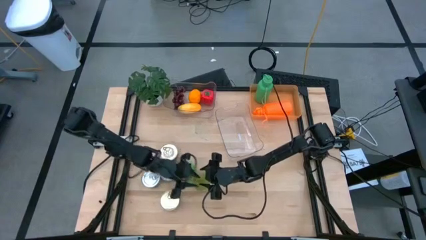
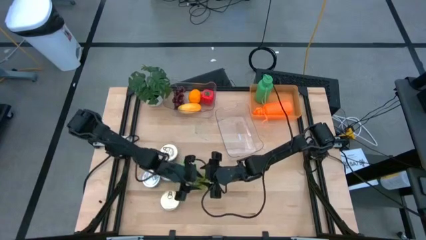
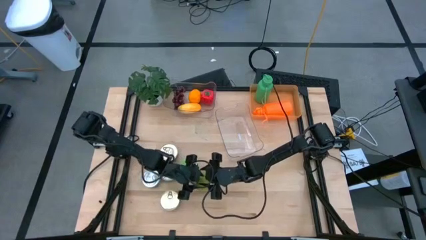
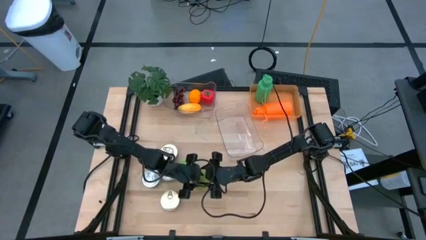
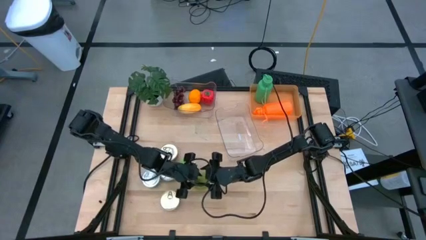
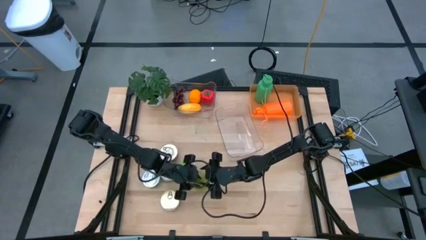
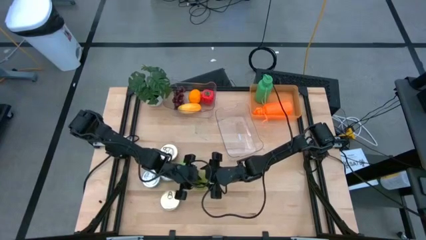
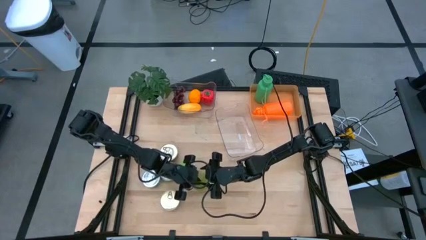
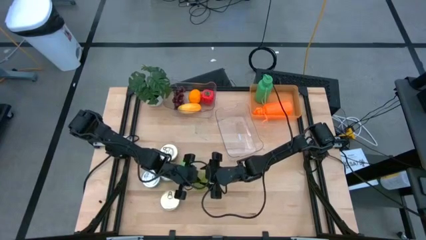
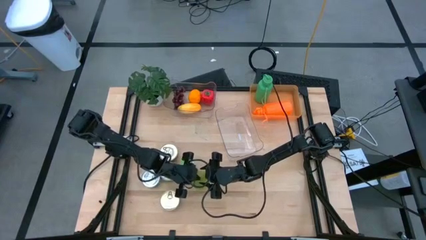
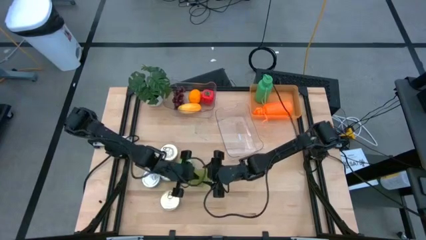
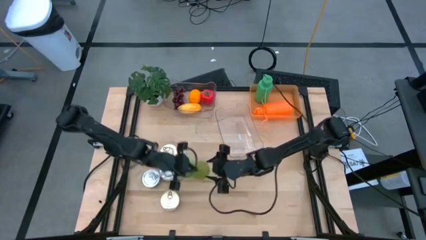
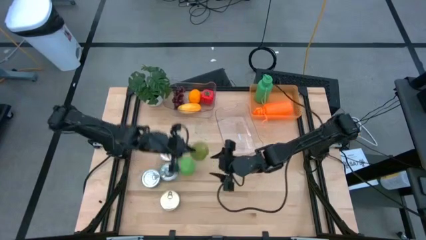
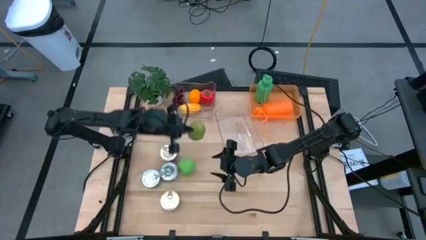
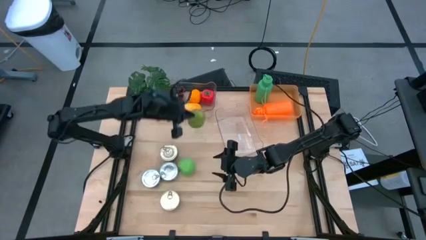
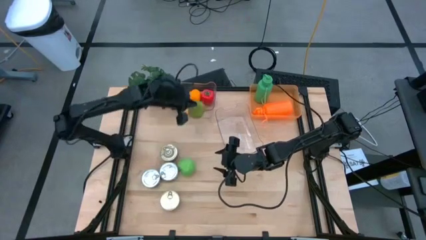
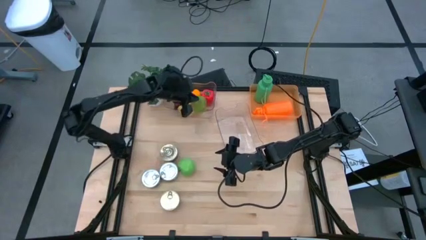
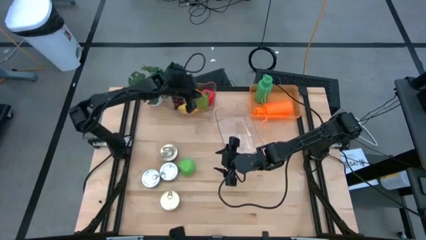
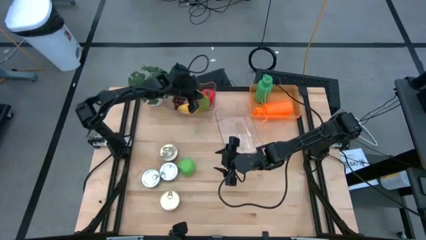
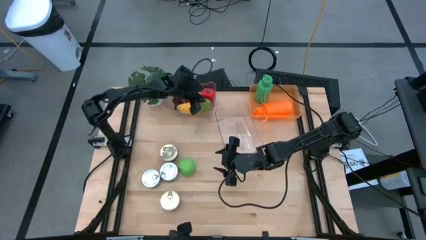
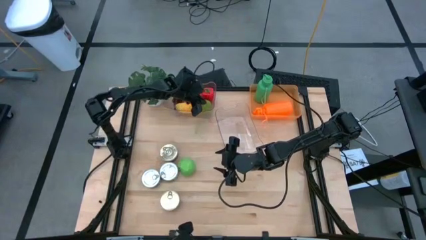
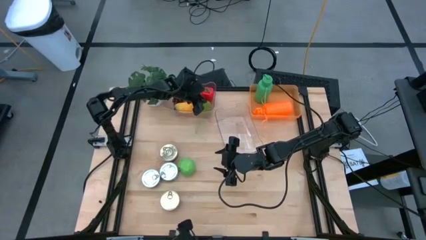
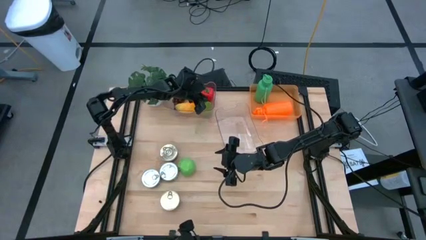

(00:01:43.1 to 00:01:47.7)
Task: Pick & Place Food Item
Put the green pear into the top transparent bin

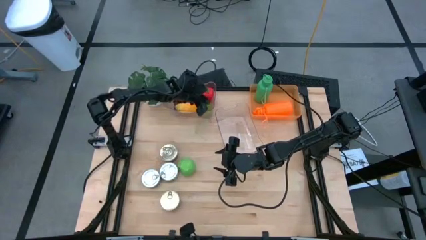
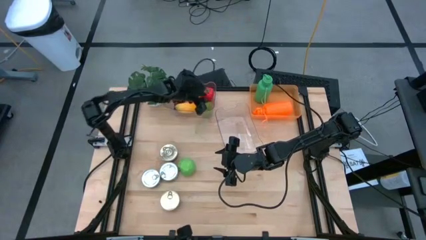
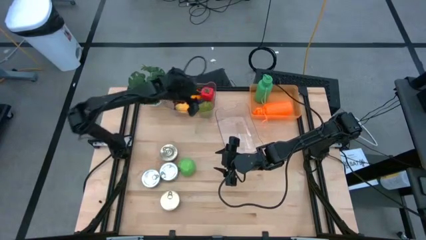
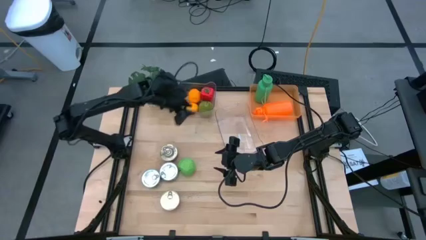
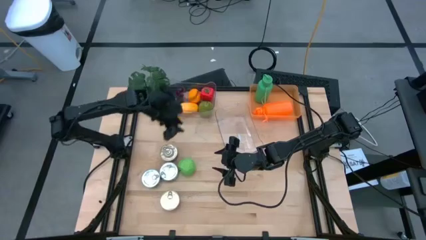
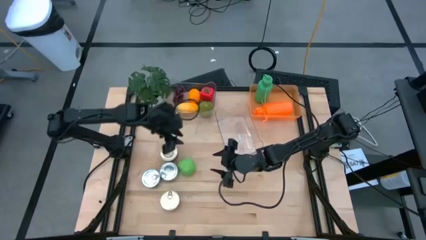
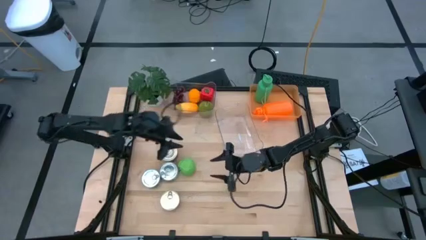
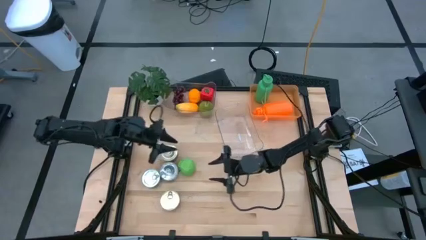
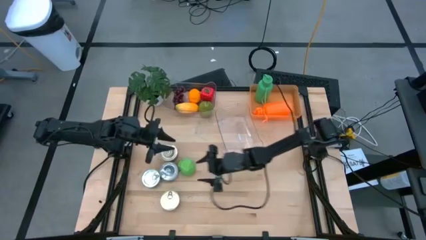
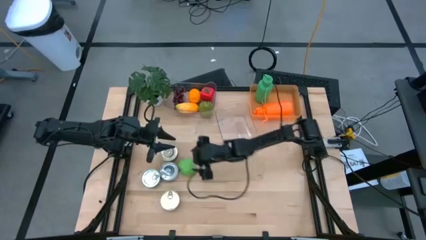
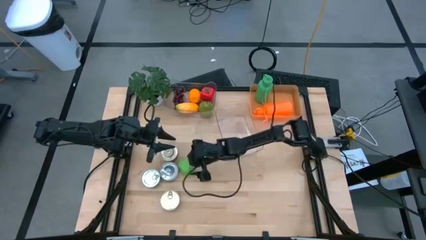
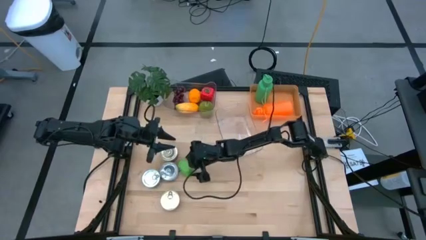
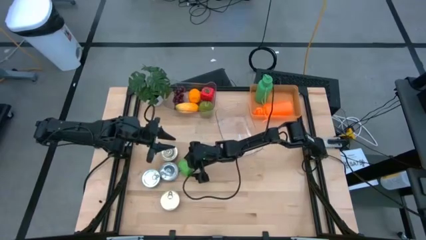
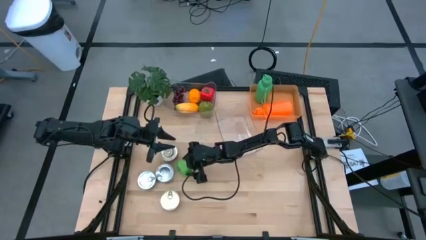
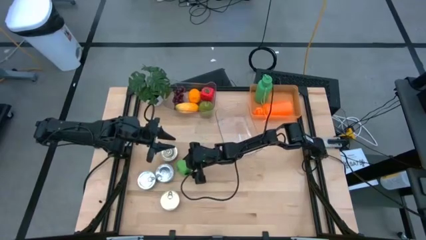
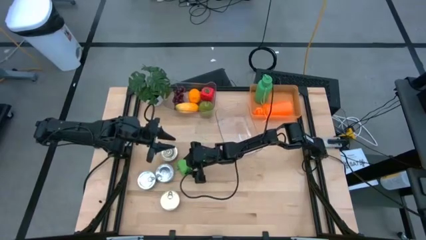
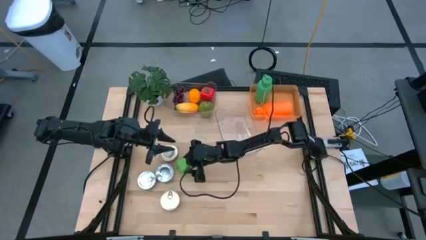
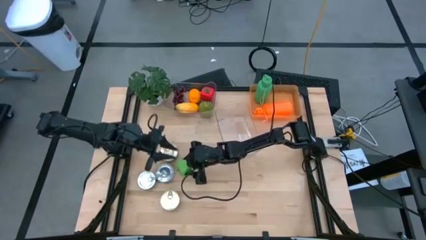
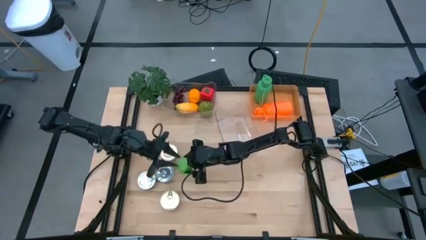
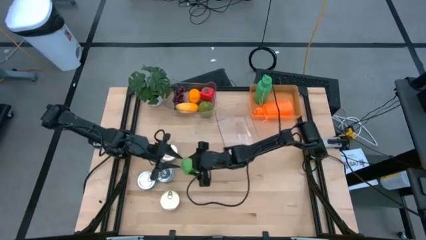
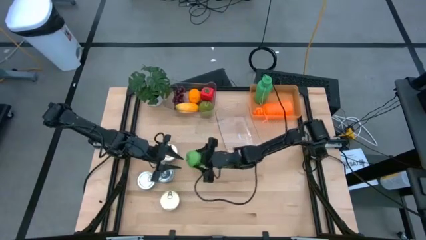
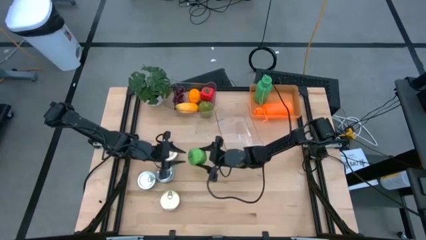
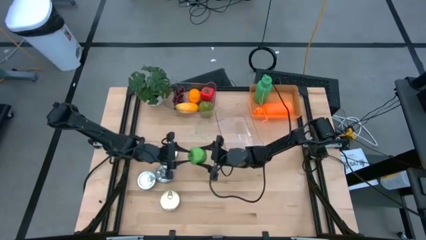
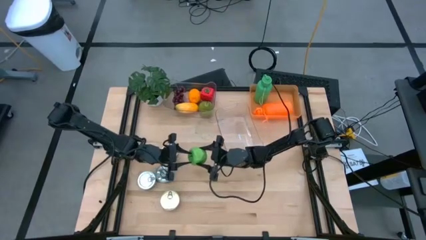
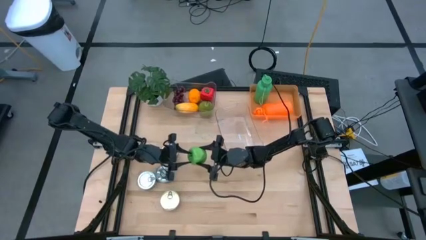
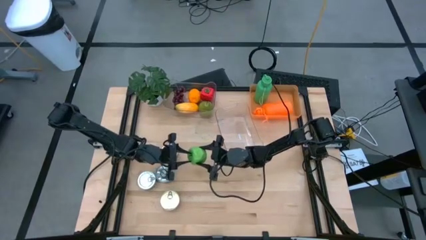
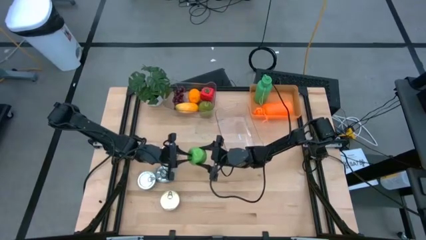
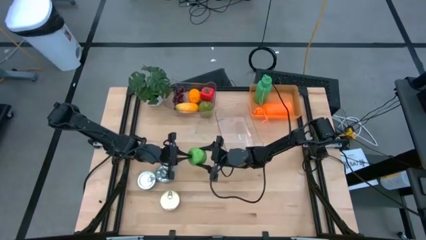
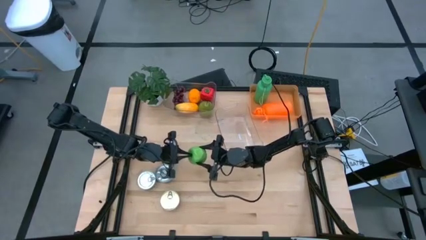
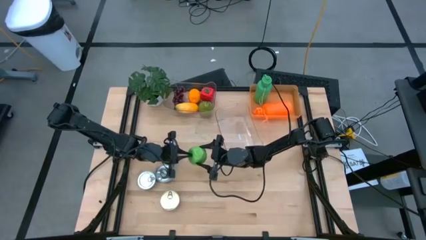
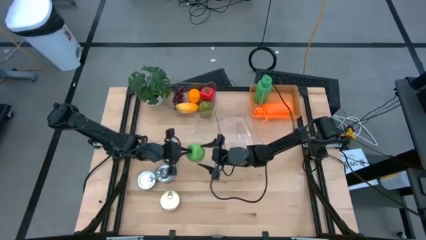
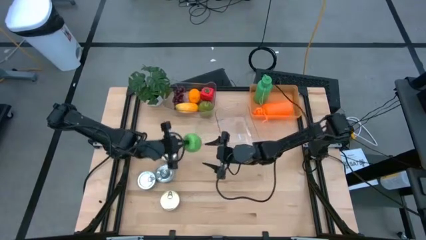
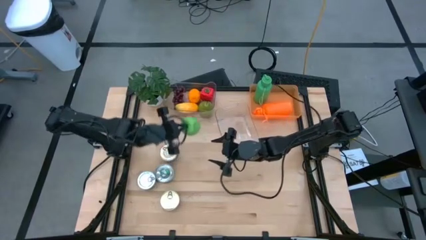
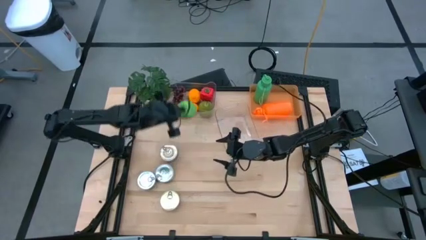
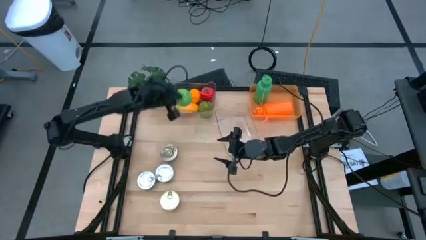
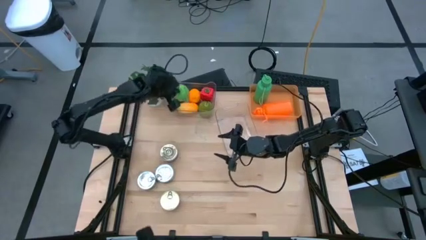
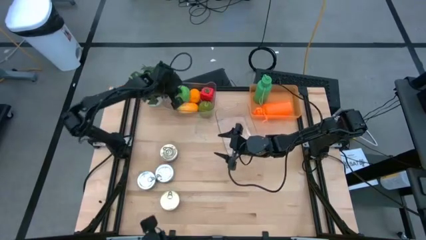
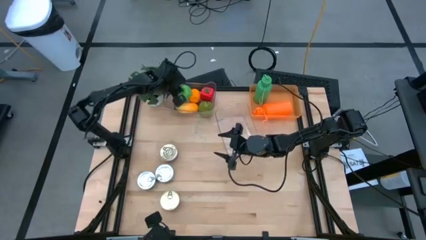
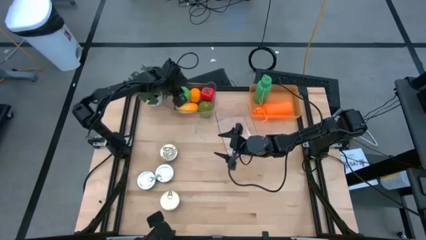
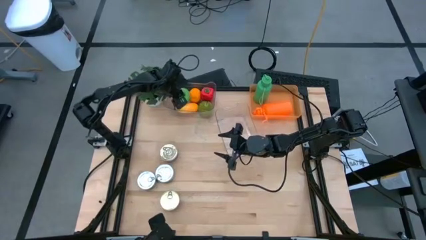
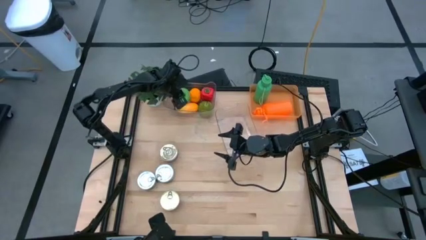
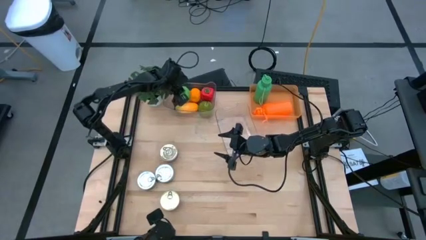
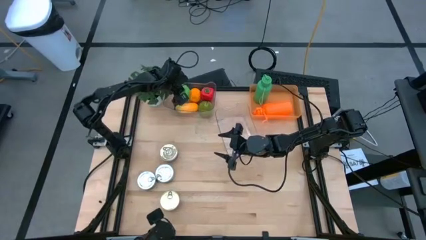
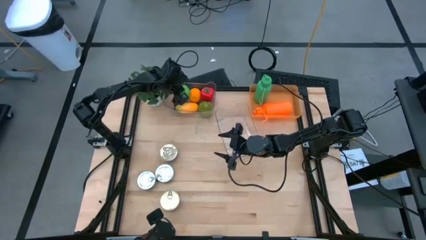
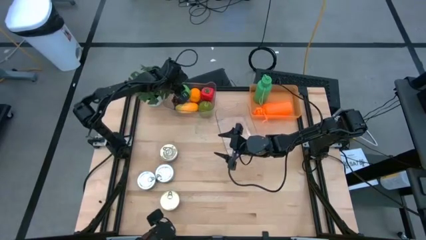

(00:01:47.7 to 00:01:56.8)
Put the green apple into the top transparent bin

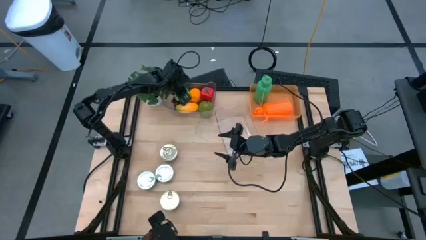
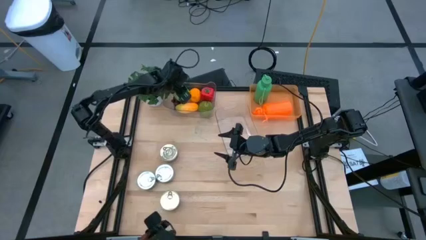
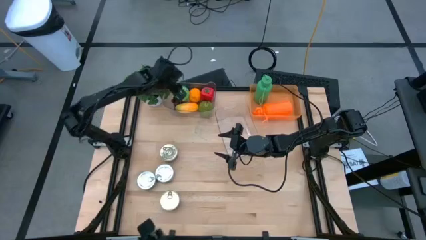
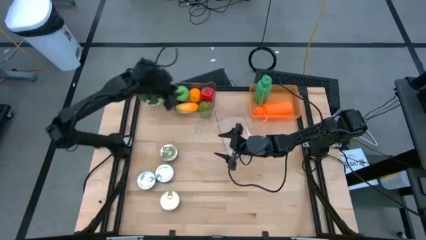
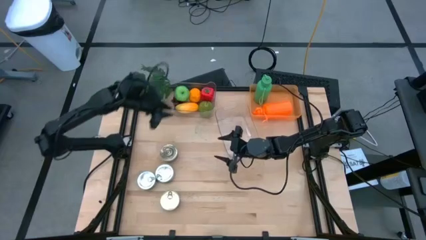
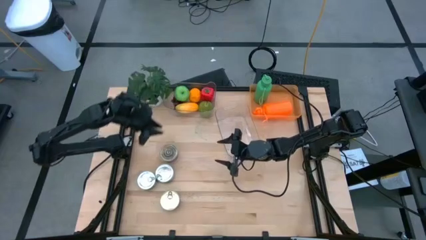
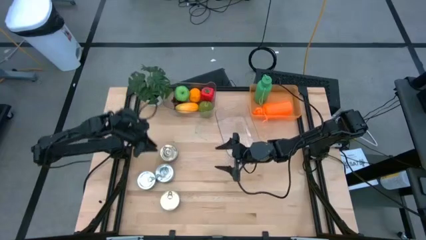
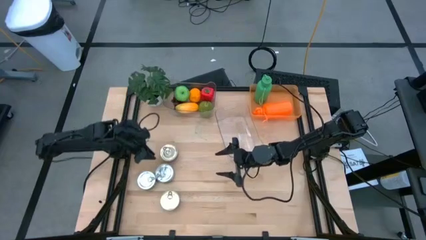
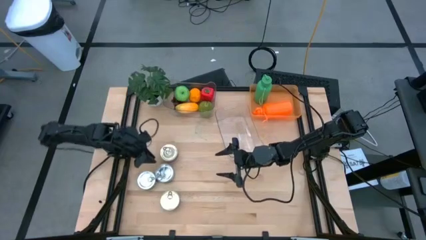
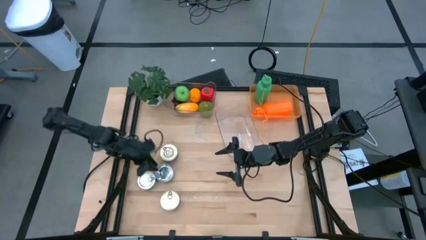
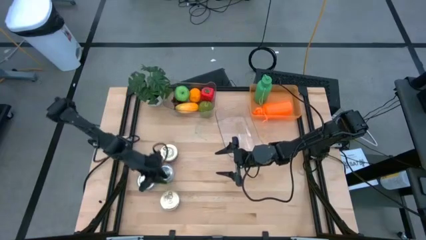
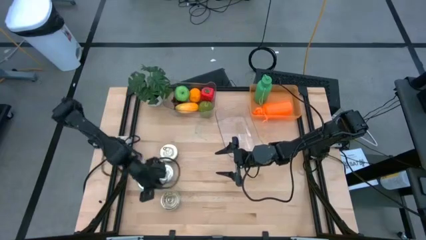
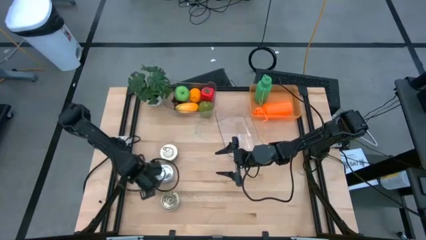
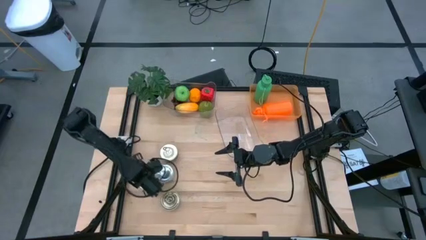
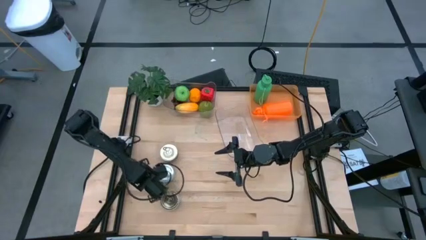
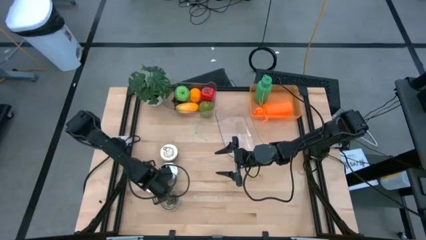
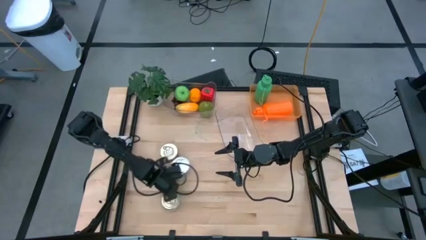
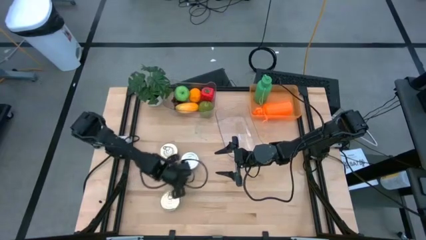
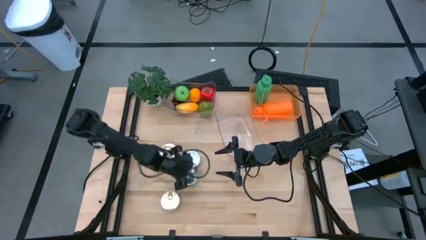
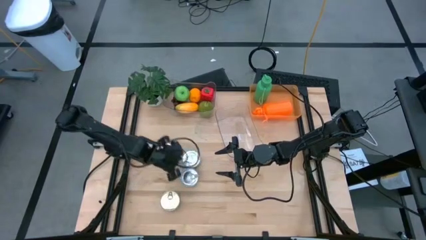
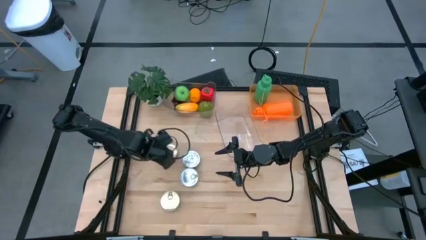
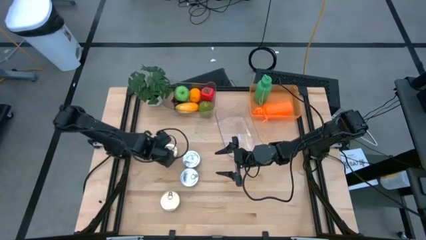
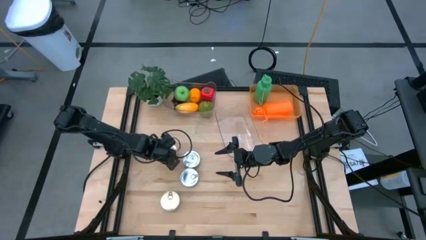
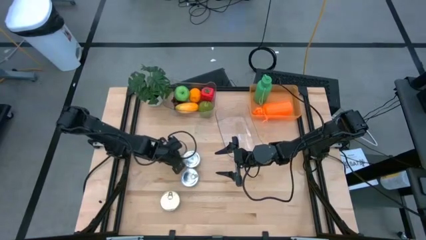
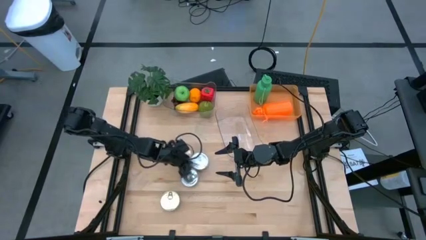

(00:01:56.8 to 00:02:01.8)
Adjust the tuna cans on the table
